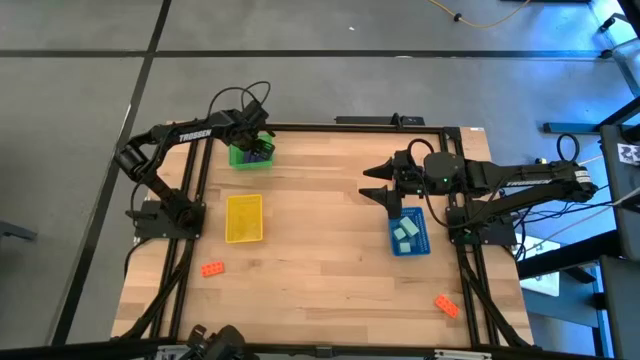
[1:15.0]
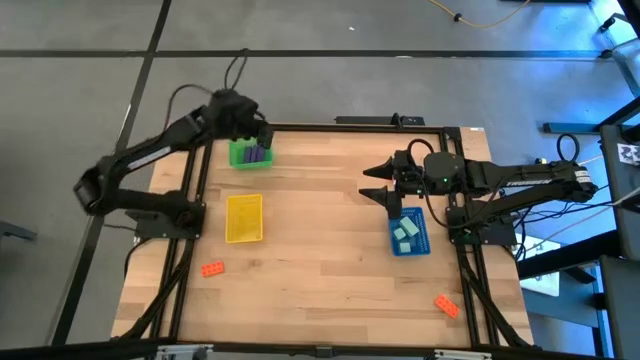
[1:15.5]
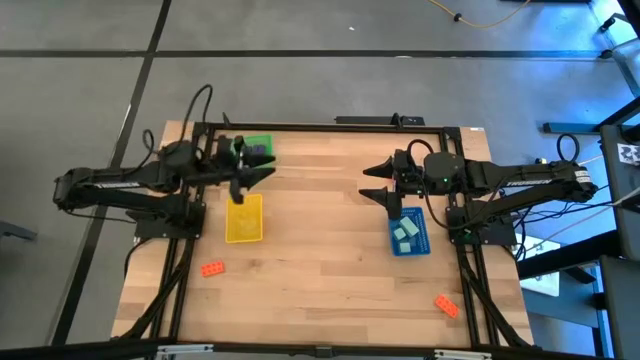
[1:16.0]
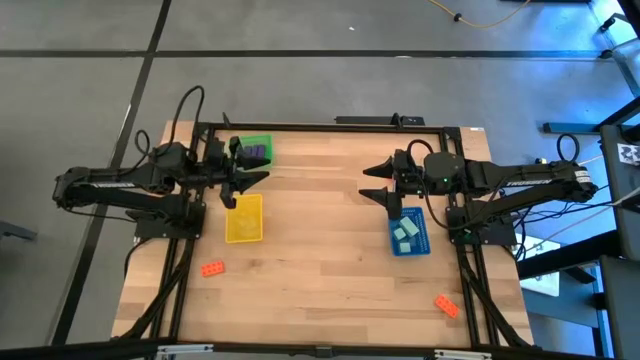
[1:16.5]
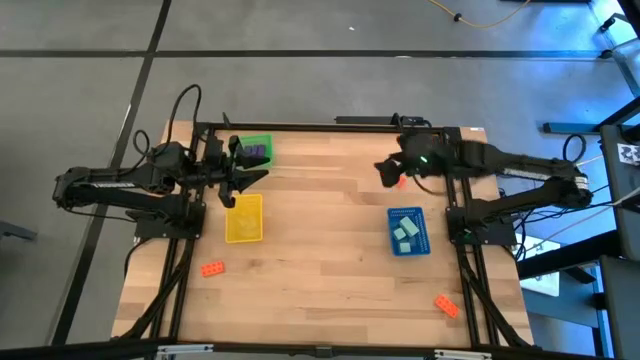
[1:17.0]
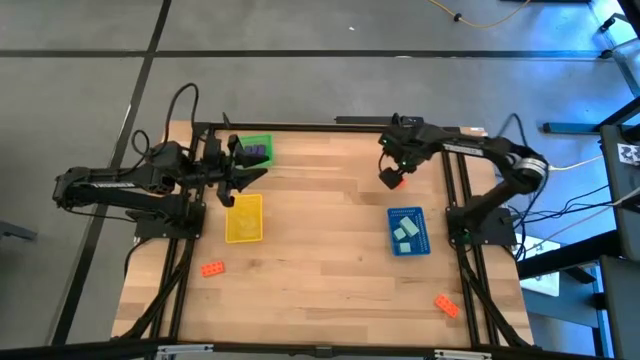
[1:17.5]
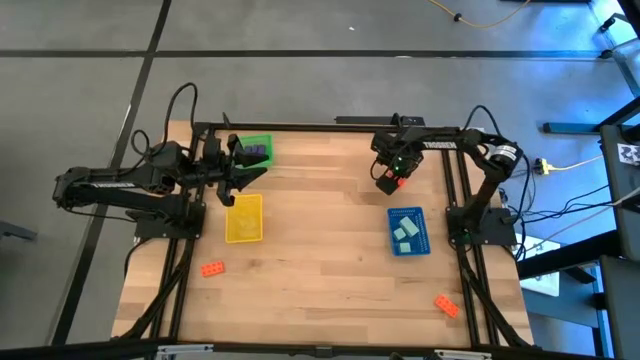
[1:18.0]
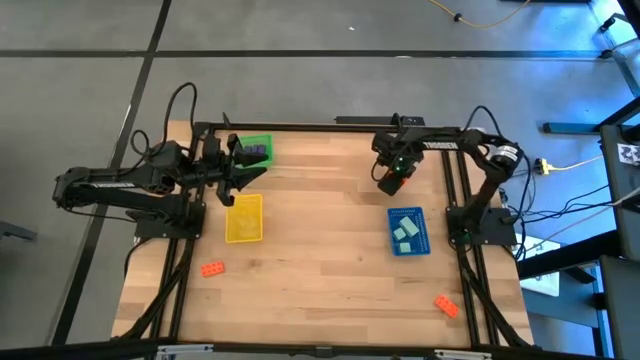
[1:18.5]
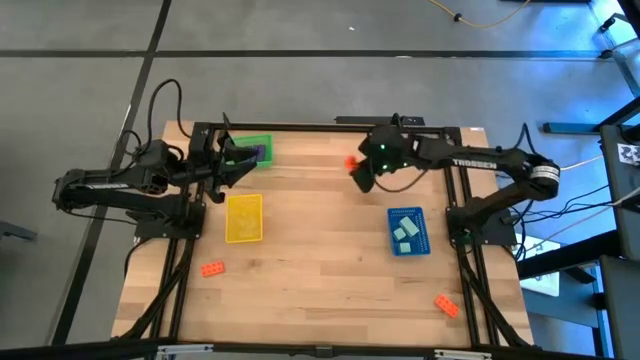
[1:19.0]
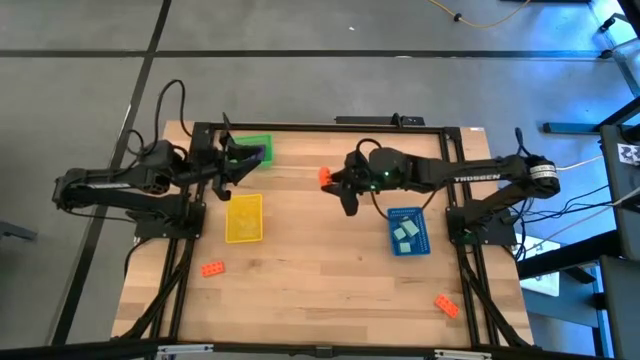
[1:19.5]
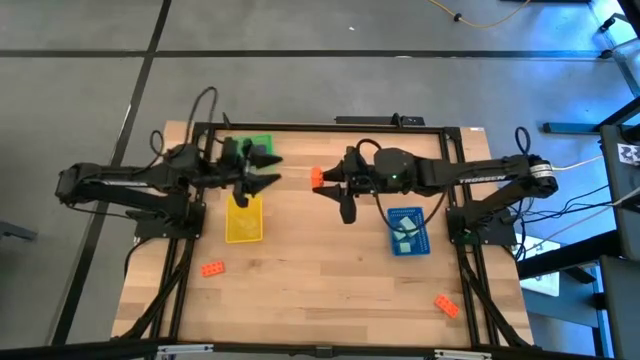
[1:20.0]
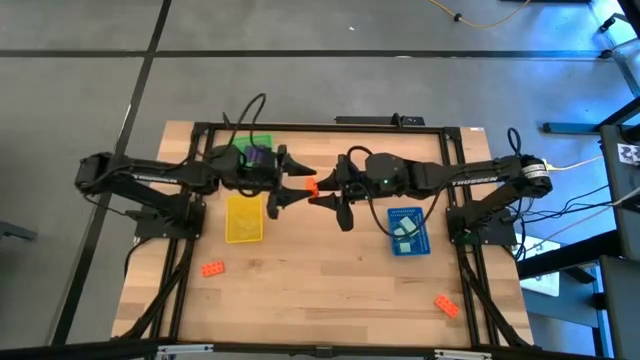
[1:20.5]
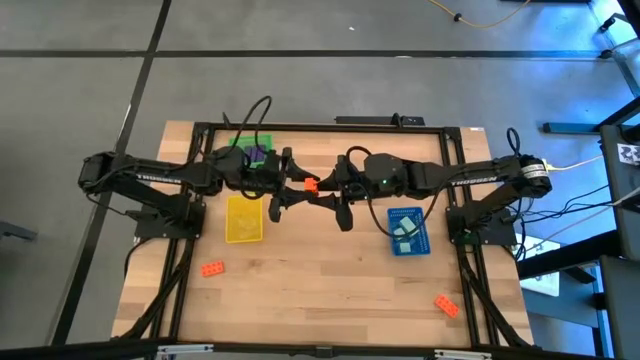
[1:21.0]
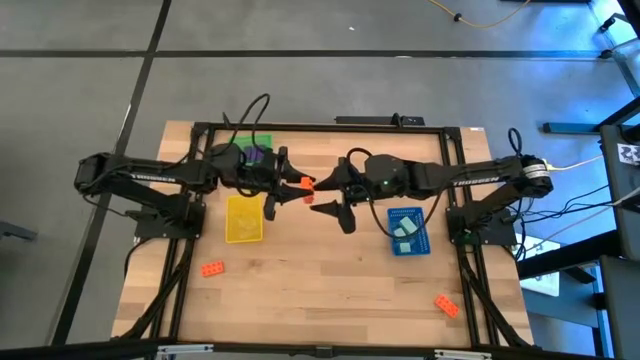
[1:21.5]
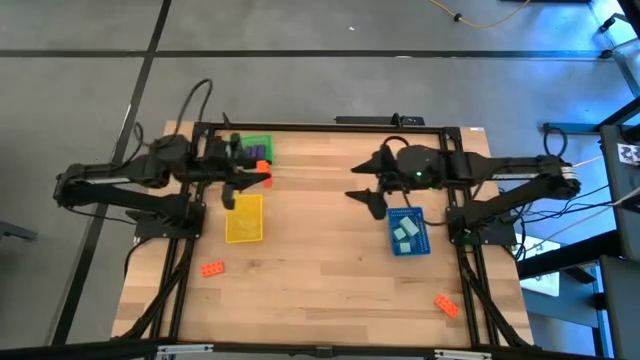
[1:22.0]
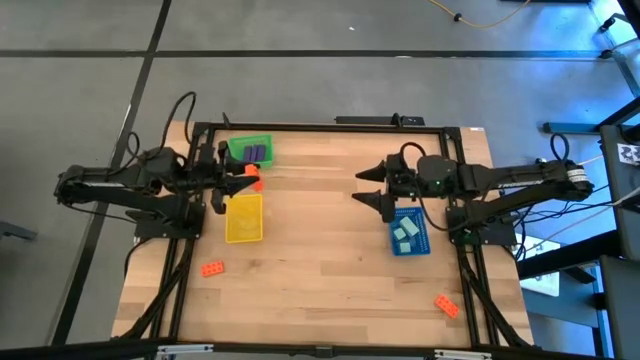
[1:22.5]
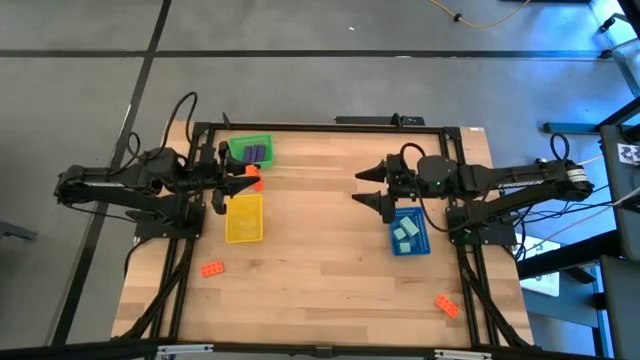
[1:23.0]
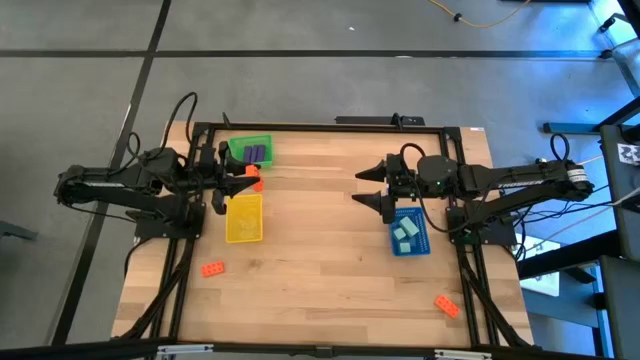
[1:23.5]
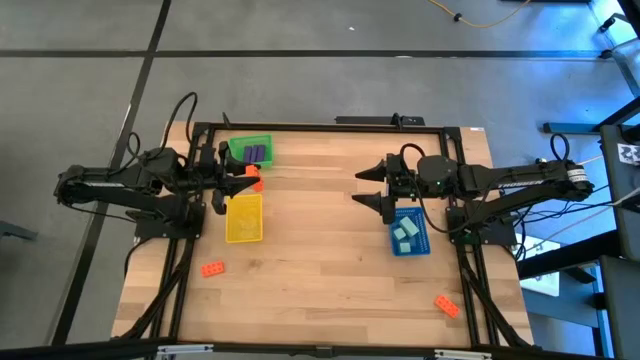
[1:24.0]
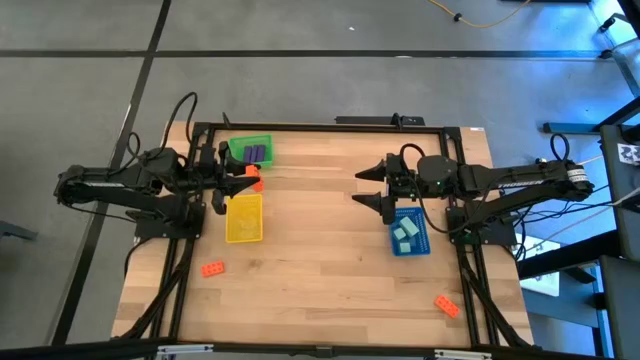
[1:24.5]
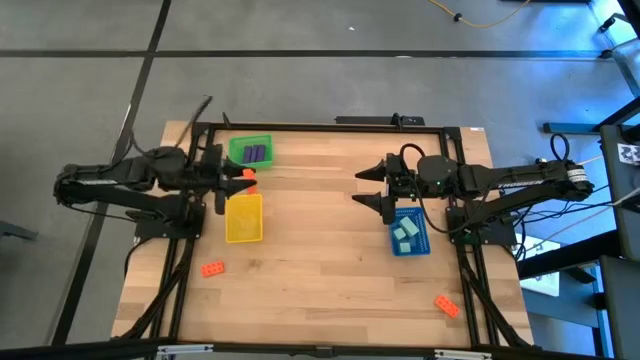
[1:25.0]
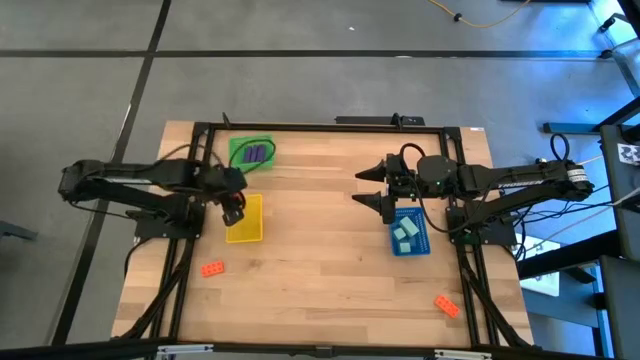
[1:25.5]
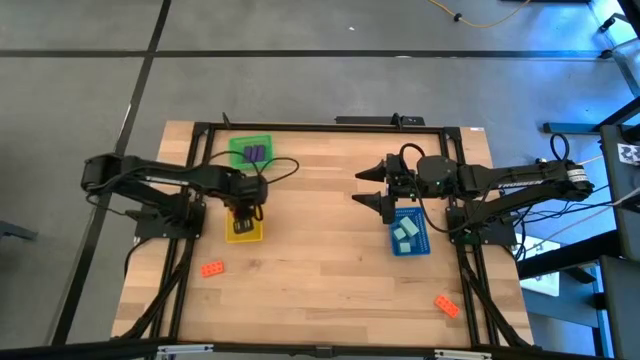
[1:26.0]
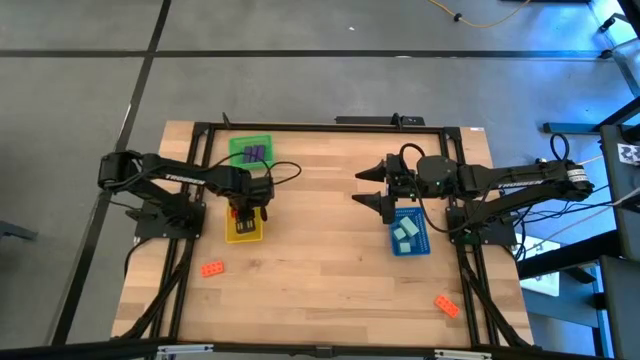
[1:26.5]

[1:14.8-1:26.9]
Task: Sort & place blocks by color
Put the top right orange game piece into the yellow bin

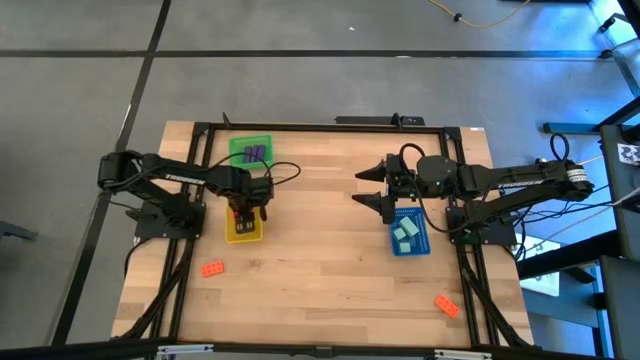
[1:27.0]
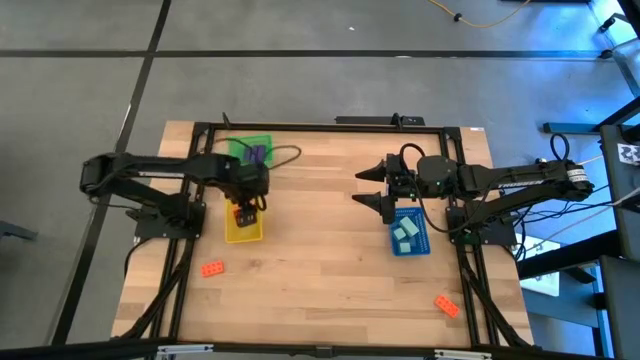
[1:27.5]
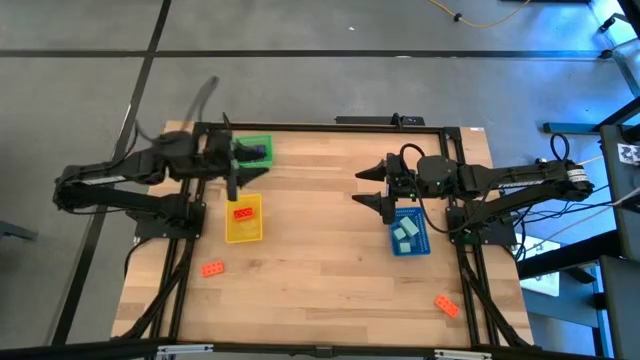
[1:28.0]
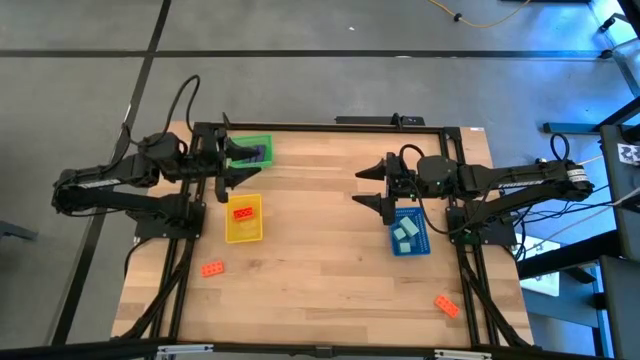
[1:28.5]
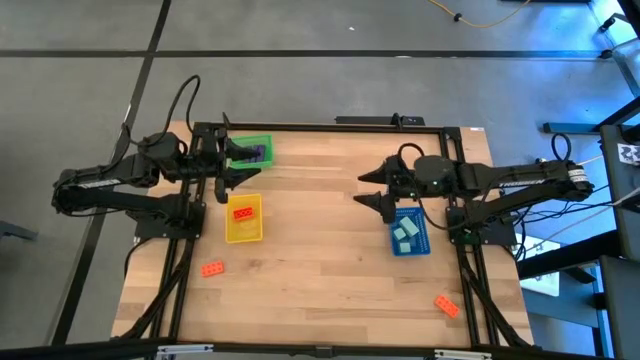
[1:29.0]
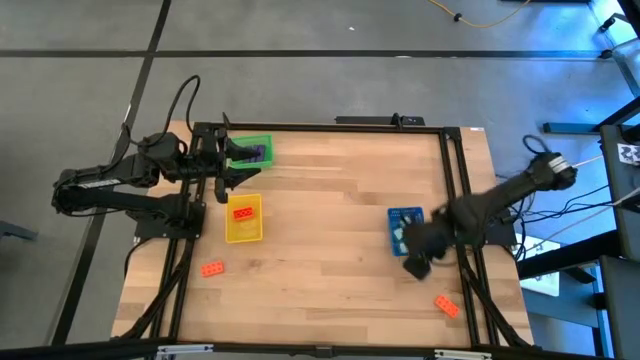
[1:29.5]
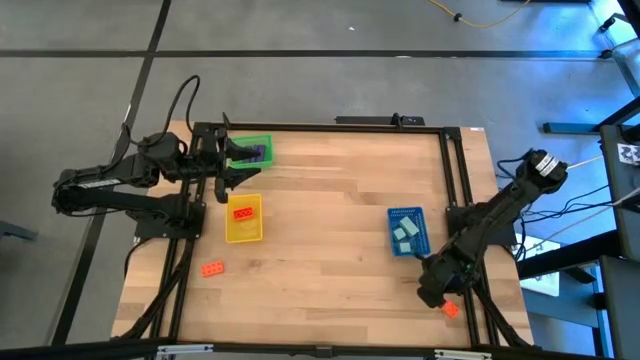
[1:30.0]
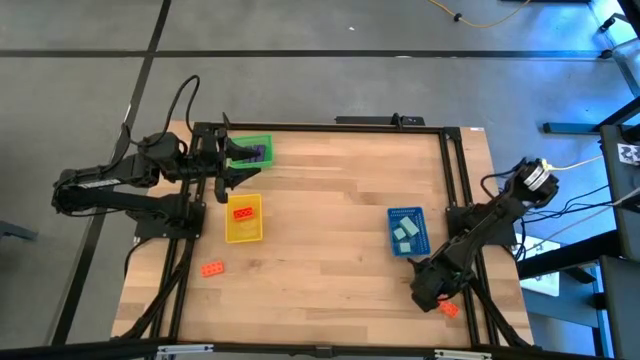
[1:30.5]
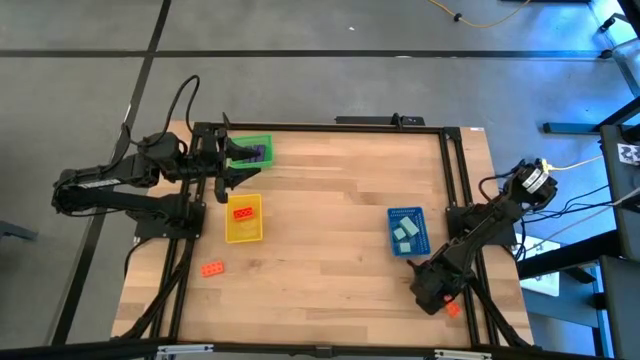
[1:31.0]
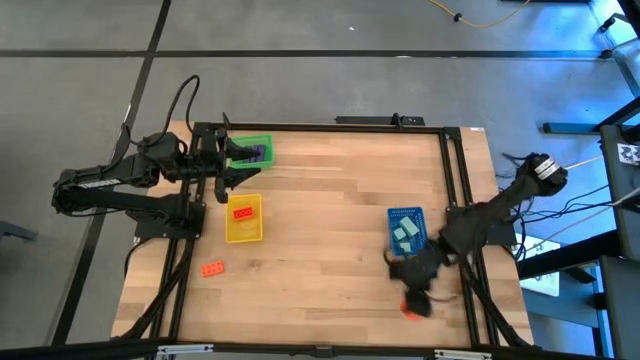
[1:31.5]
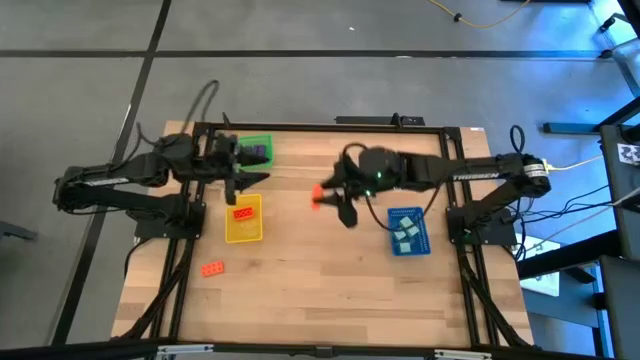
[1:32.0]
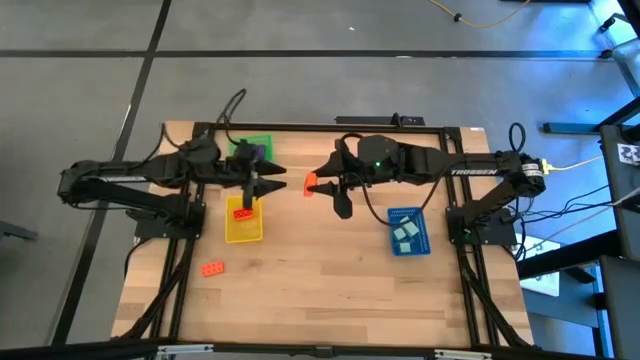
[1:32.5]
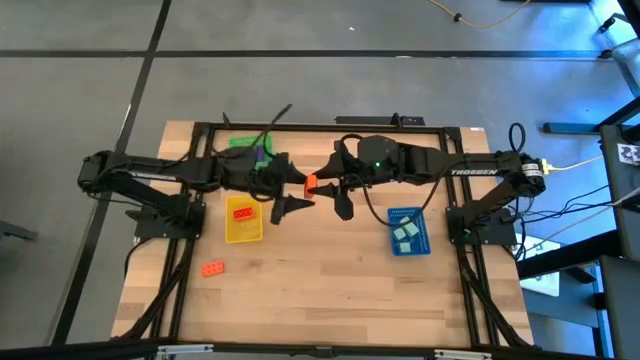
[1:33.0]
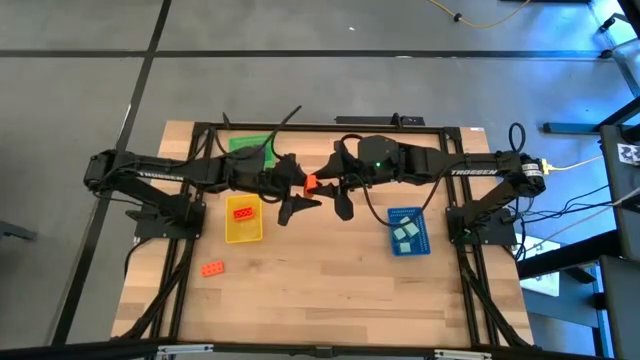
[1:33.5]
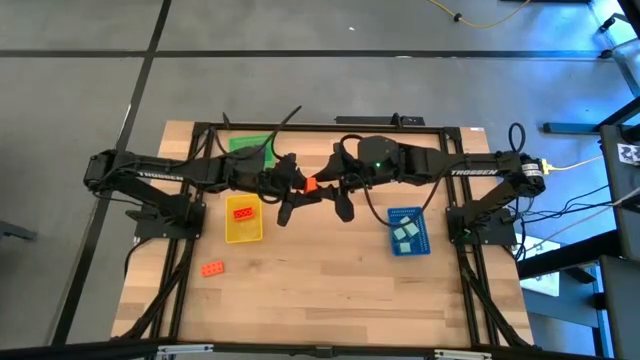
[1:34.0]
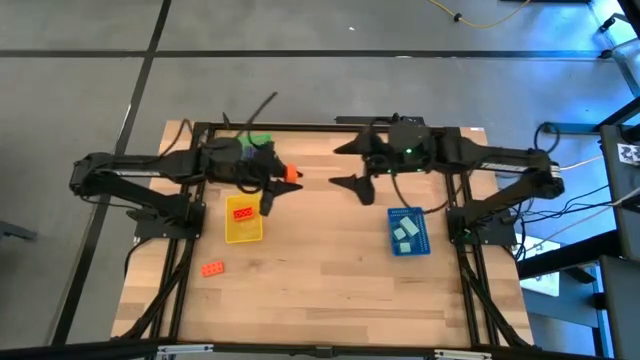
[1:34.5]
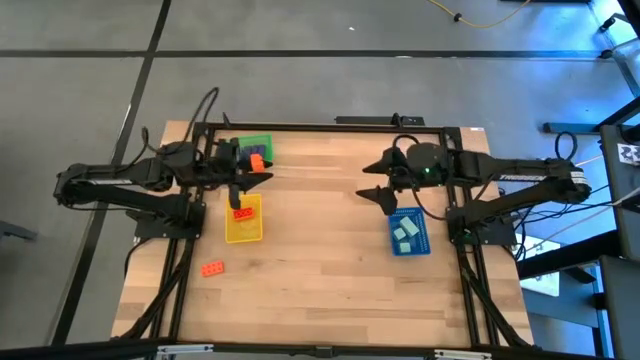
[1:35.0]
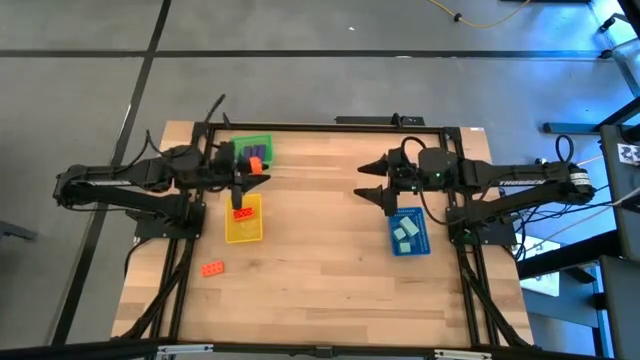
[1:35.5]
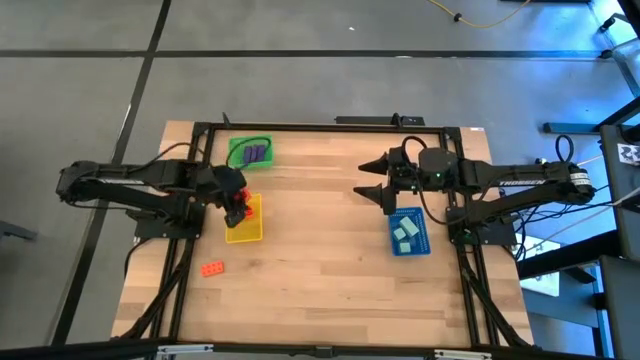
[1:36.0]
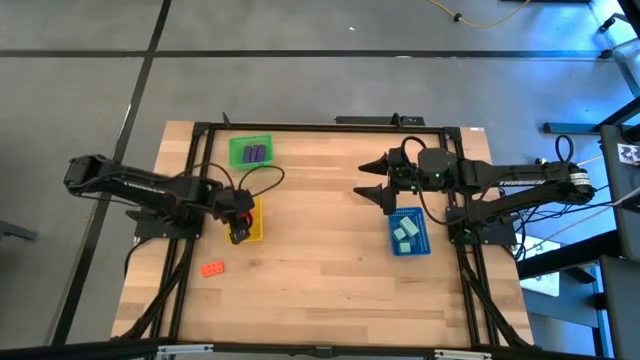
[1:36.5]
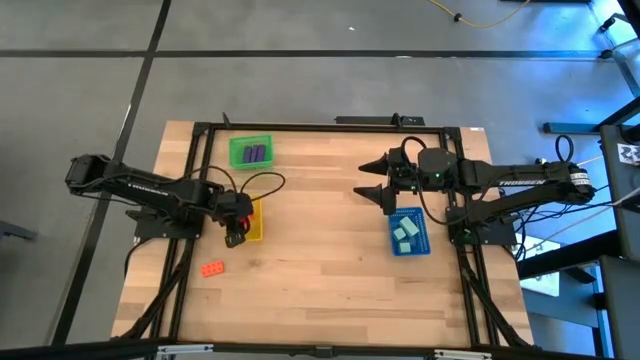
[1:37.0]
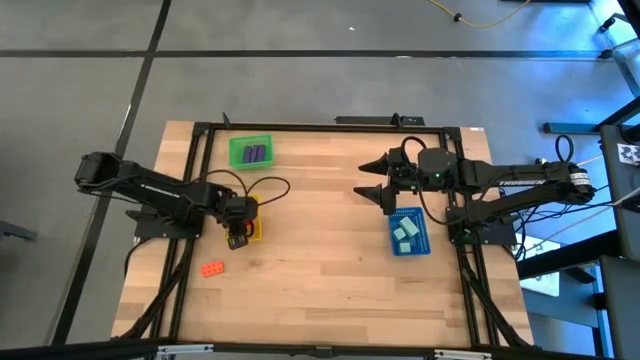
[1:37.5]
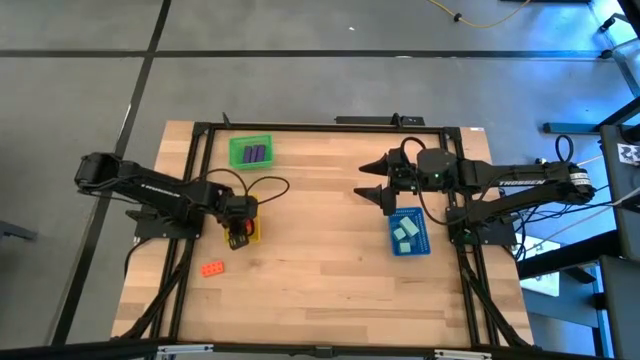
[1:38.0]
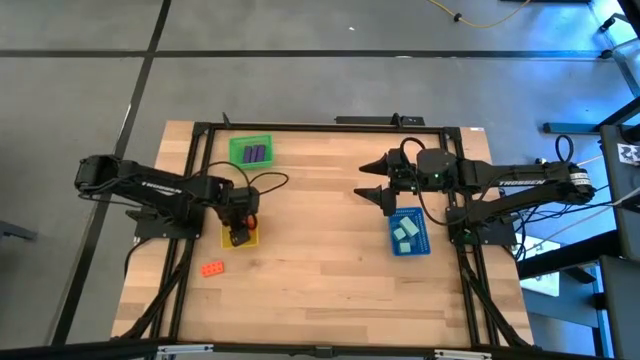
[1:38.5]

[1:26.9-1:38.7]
Put the right orange game piece into the yellow bin
